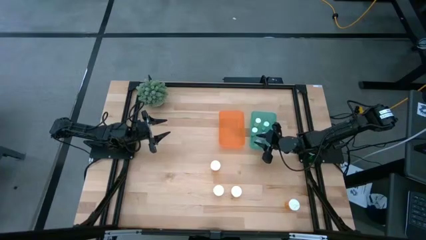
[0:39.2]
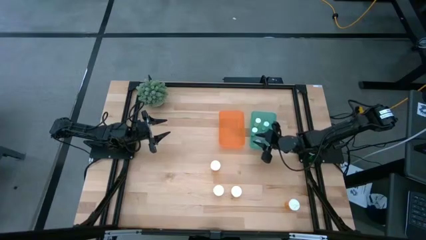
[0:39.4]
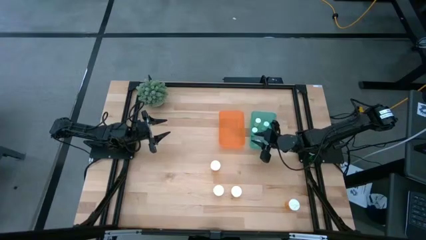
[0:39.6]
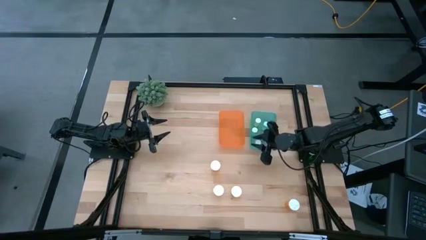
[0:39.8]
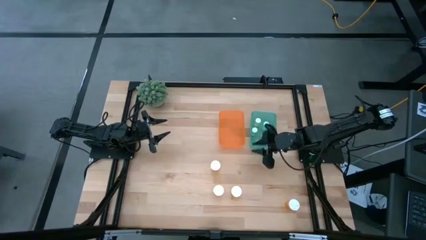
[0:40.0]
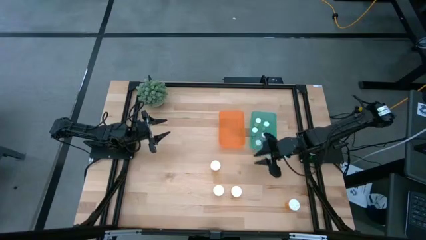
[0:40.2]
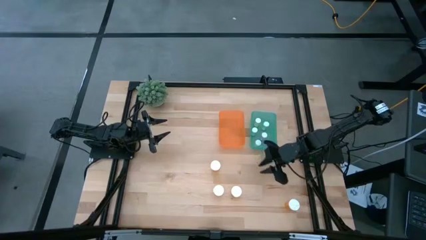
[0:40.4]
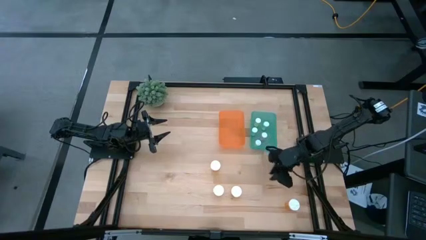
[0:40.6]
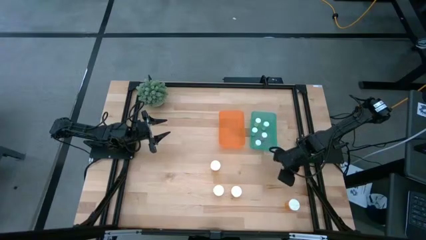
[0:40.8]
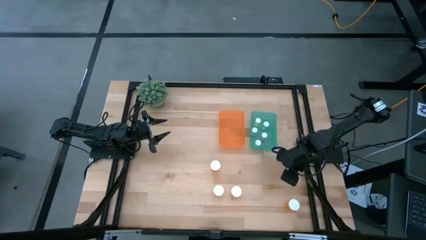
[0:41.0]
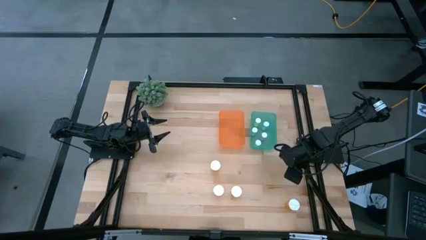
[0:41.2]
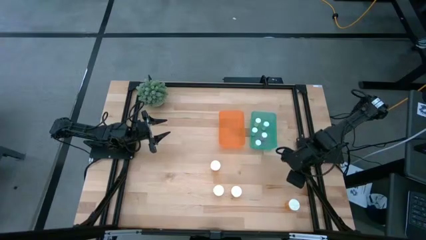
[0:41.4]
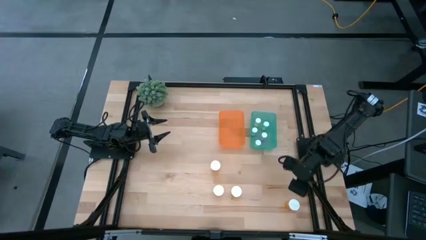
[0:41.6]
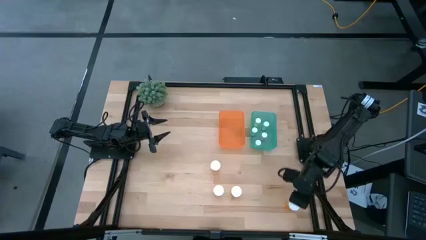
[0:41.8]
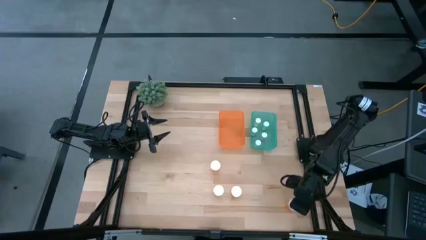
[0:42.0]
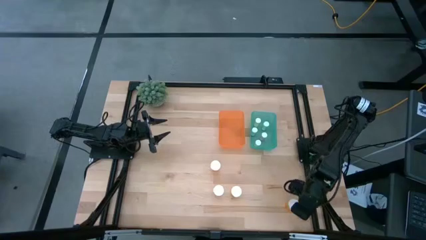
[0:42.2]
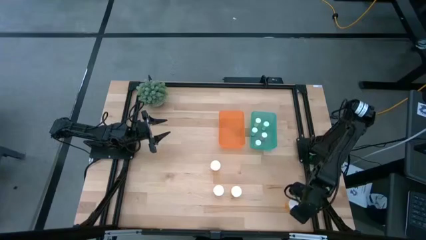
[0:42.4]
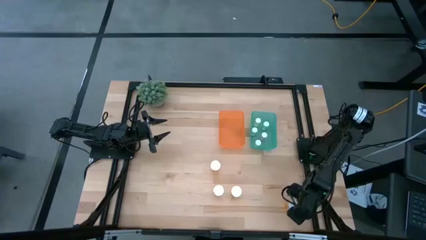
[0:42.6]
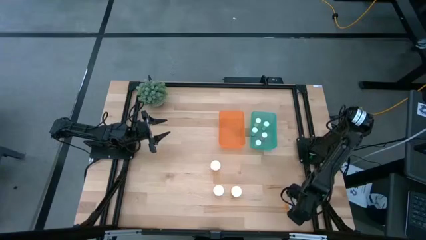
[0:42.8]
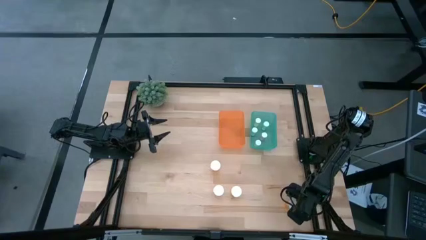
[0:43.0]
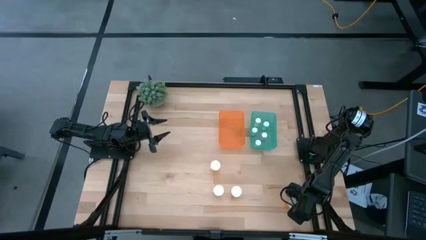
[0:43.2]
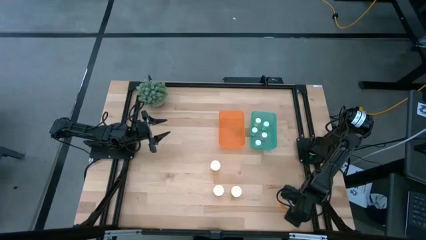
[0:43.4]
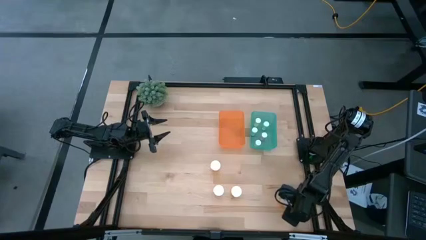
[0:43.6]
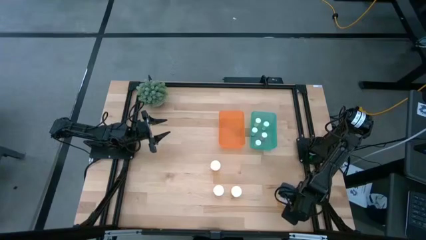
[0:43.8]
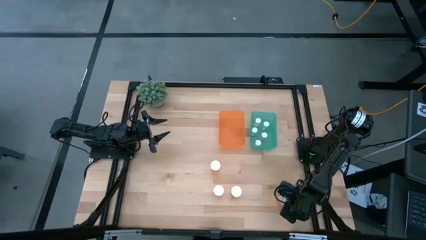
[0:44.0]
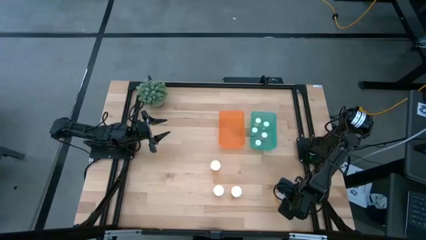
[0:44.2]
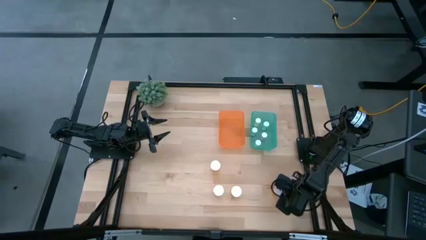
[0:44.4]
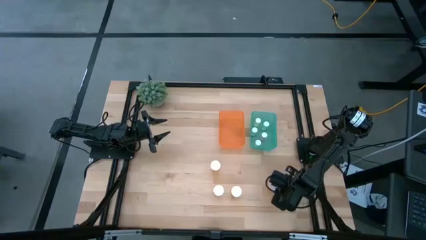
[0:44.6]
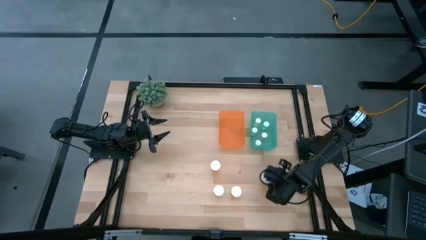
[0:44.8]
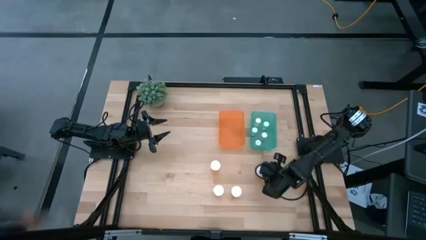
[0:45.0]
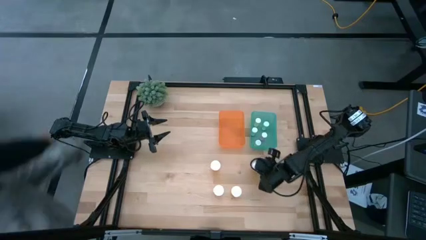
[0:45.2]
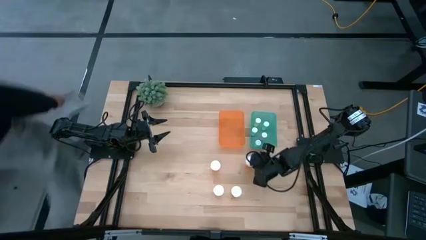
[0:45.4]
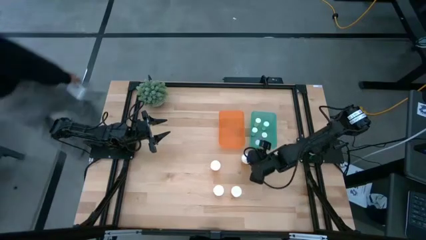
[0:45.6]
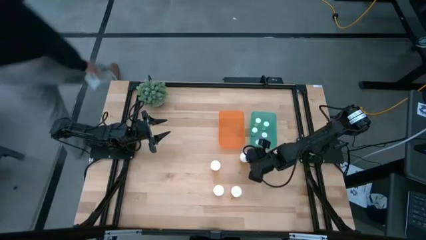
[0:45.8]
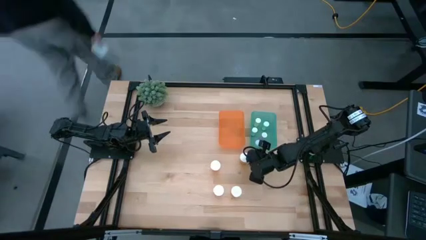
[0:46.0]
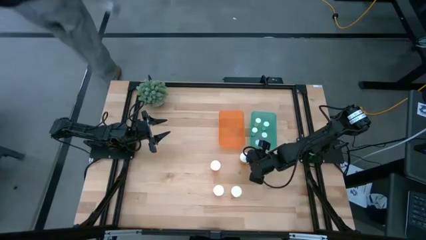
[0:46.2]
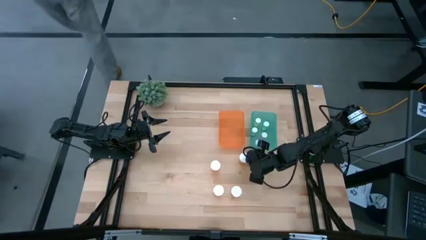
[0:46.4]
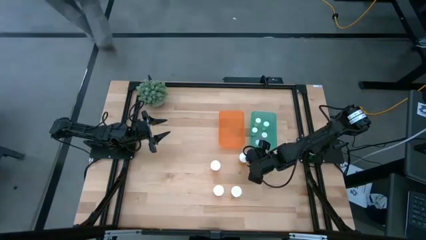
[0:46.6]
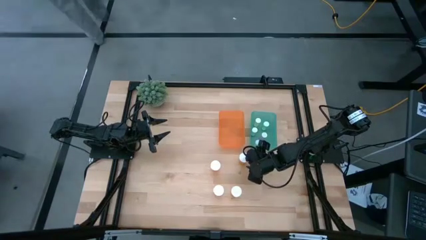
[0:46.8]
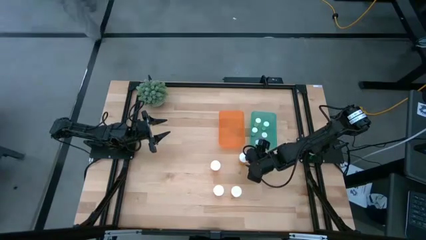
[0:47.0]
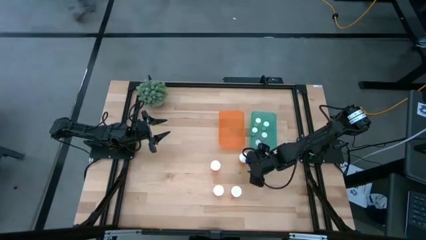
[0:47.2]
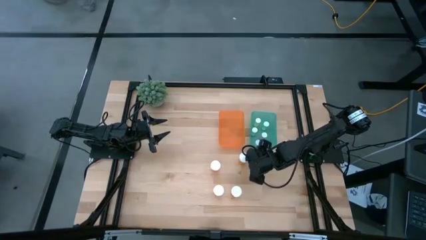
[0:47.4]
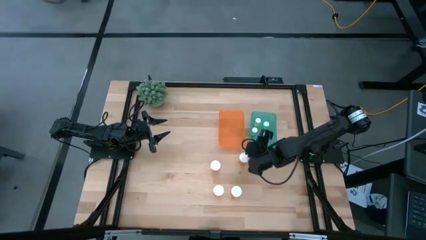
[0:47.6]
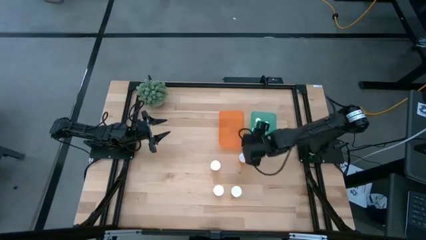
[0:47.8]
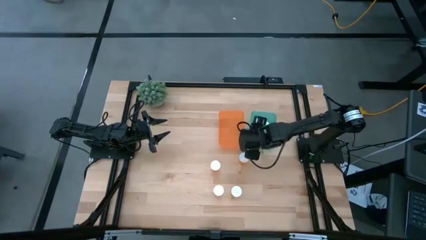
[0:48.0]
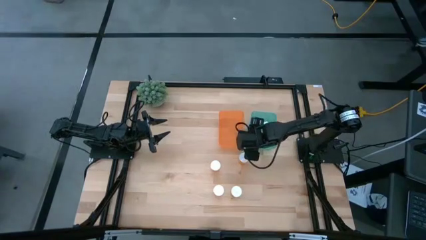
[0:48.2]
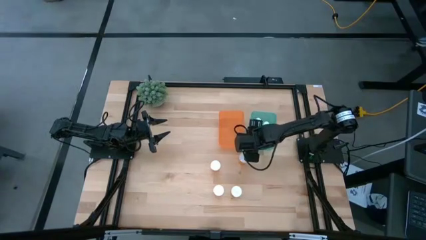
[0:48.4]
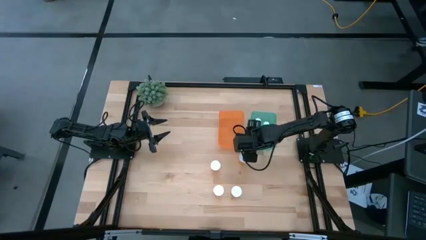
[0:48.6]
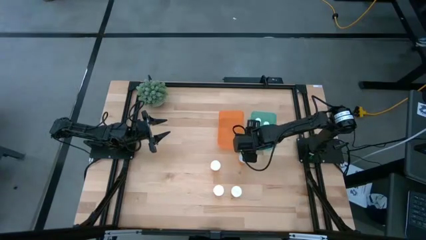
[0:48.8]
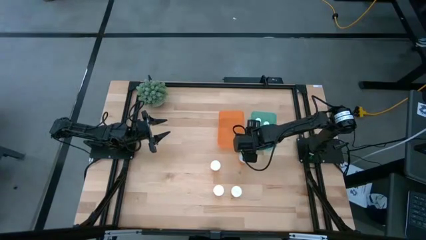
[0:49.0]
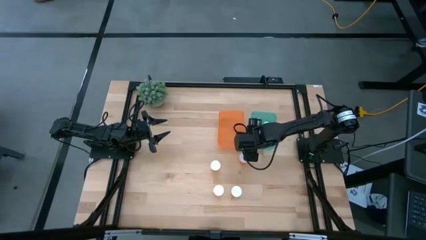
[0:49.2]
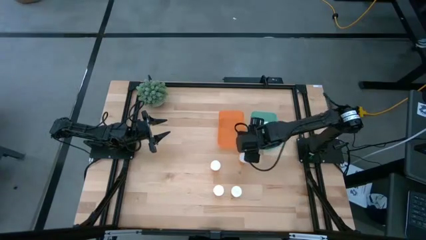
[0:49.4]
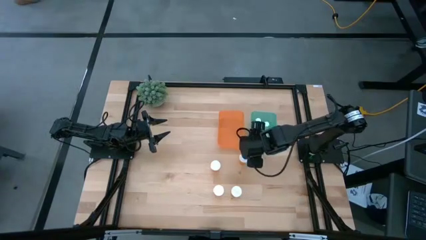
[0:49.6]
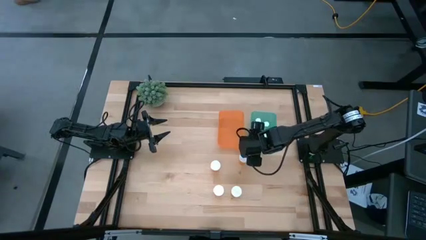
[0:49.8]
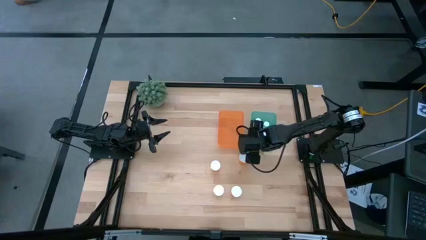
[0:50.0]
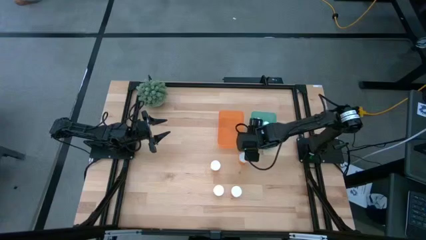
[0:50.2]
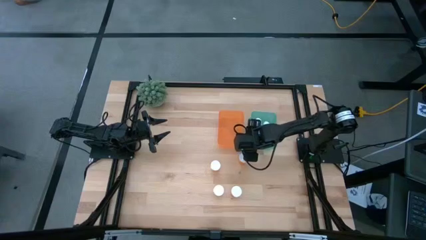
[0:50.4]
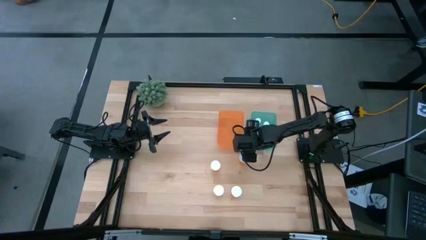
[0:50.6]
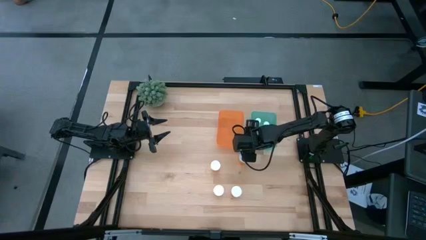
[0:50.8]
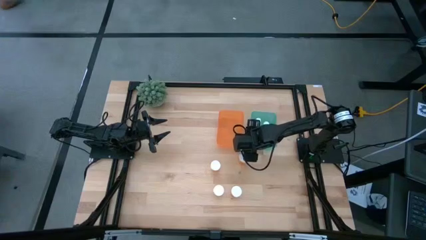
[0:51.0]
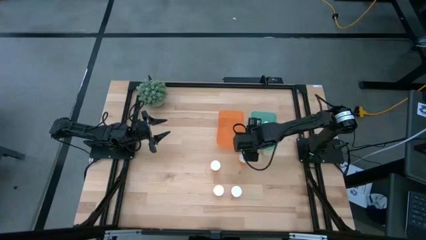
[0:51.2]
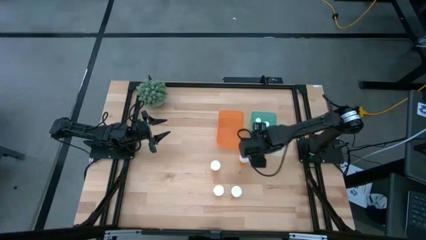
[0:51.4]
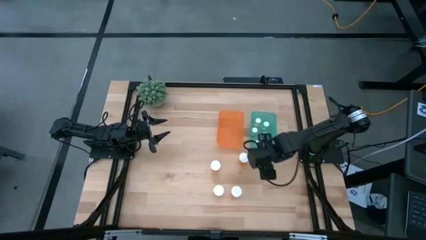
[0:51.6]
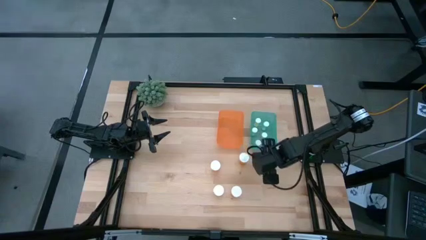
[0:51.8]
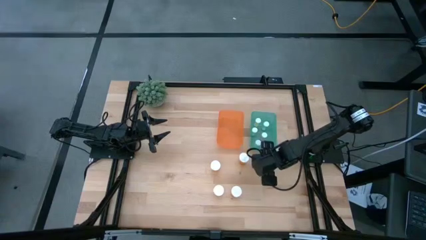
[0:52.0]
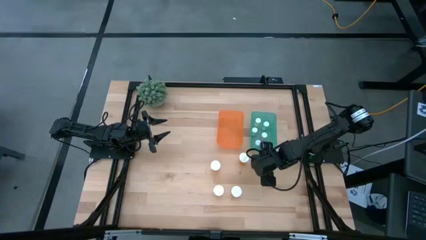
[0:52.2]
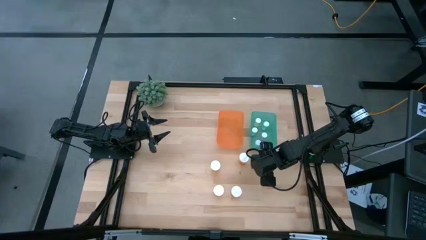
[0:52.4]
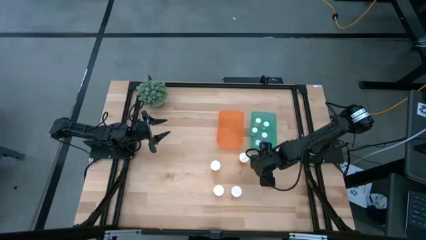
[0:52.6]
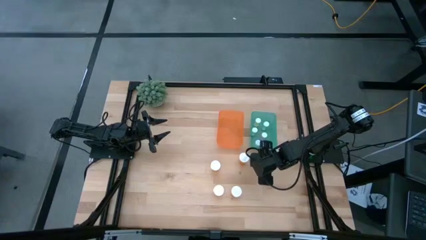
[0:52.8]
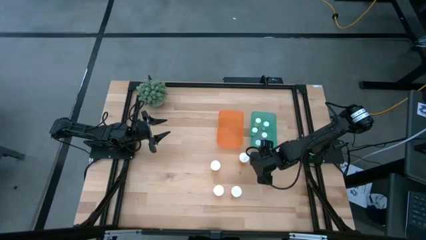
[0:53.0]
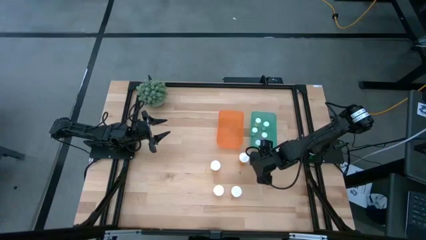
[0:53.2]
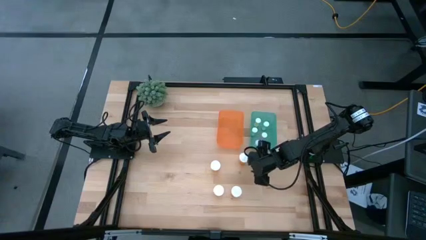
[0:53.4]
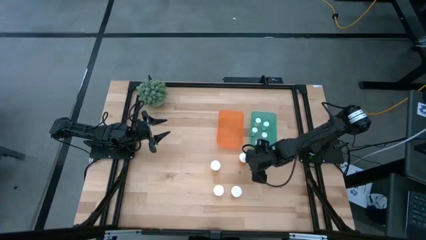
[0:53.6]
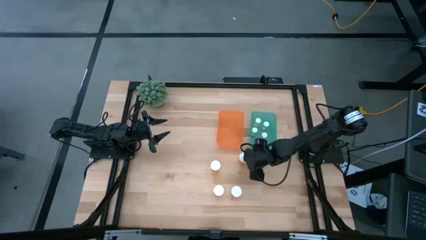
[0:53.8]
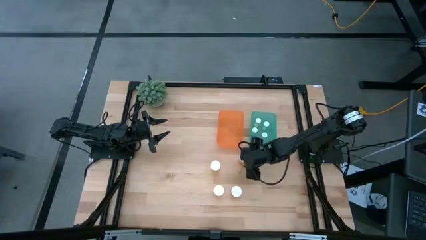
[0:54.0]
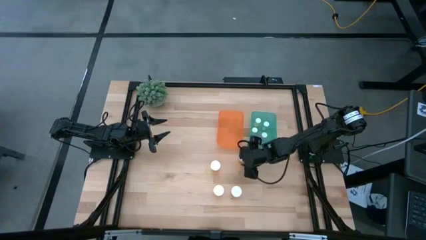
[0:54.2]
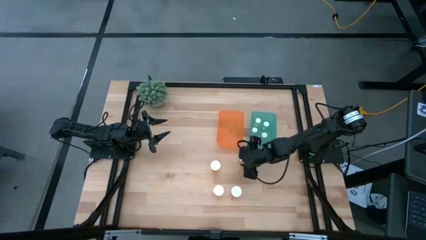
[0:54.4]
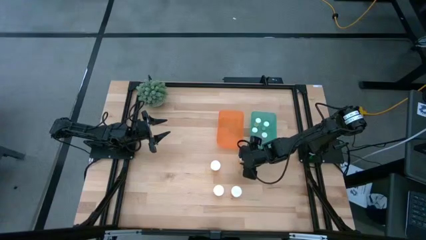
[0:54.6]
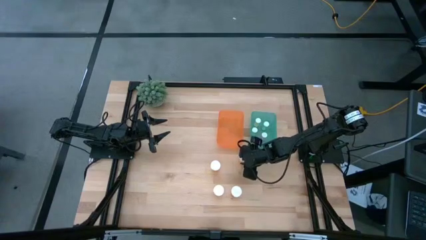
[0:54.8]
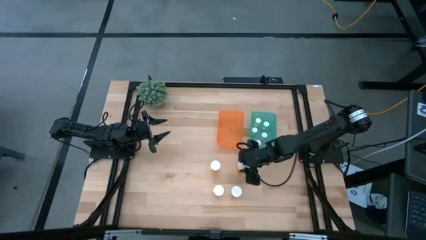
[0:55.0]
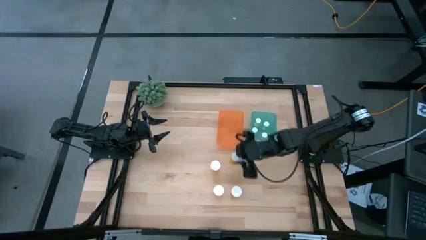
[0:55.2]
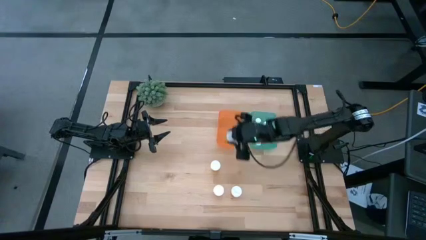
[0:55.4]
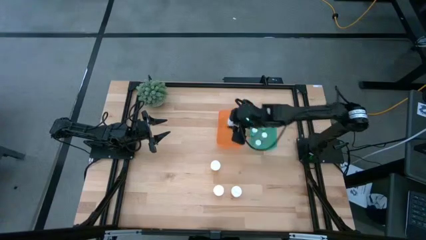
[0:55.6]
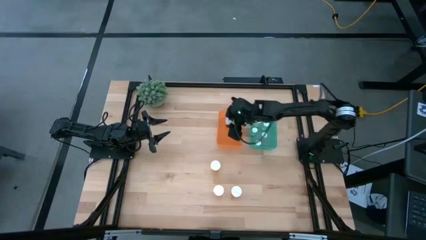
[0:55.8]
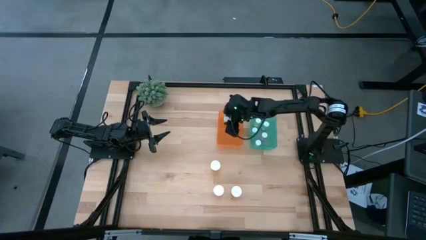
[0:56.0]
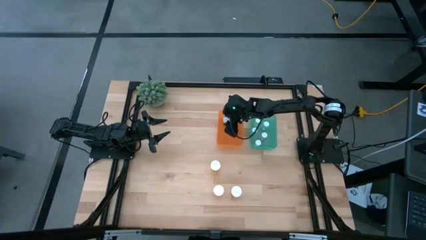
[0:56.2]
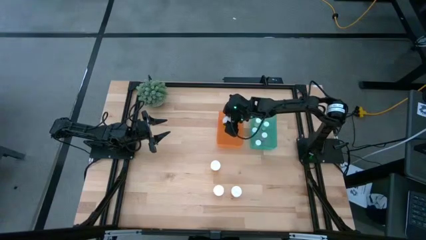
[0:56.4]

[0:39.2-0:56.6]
Task: Pick and place medicine bottles into bin by pill shape (circle, oval)
Put the large orange pill bottle into the orange bin
